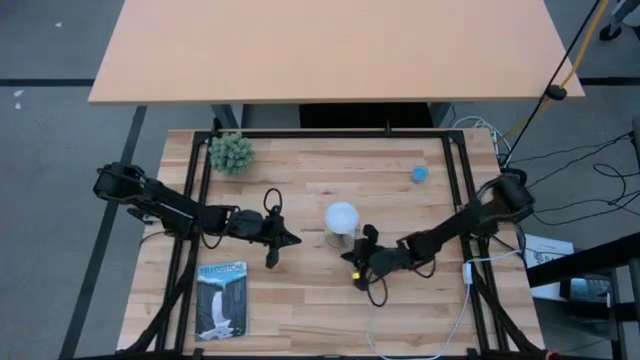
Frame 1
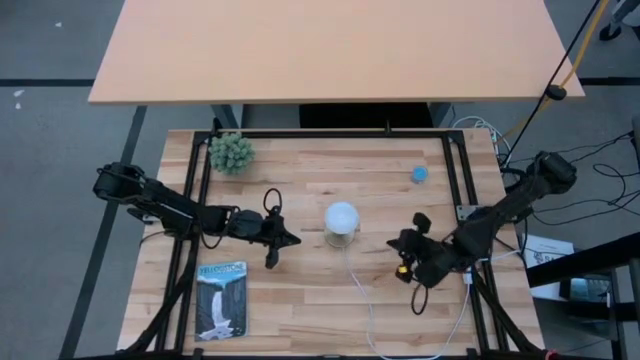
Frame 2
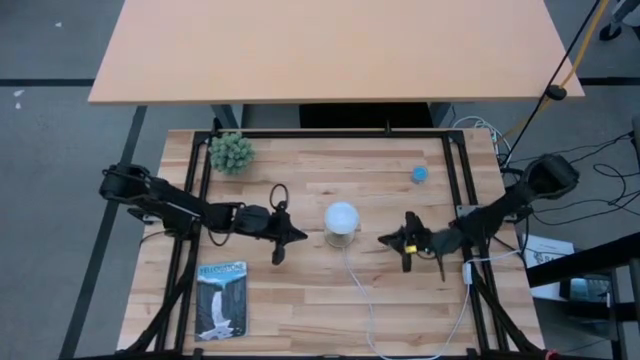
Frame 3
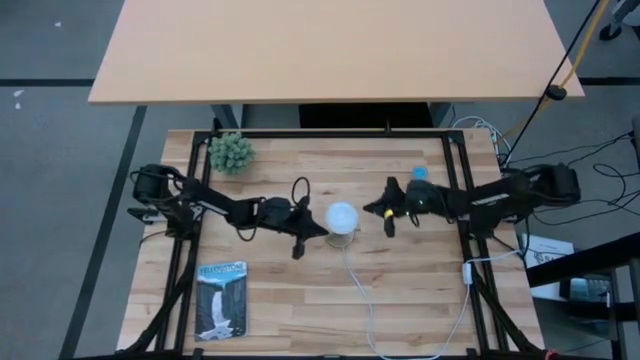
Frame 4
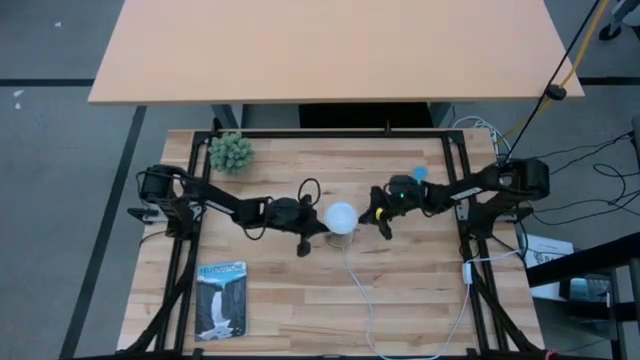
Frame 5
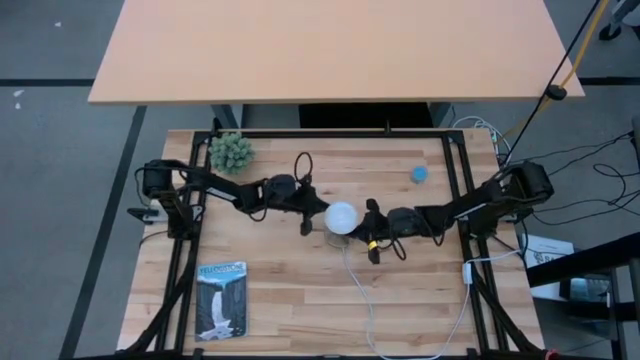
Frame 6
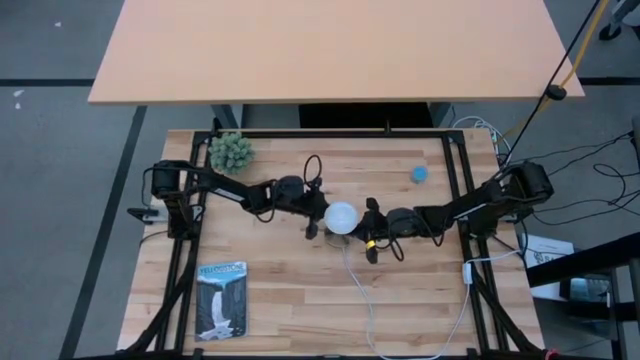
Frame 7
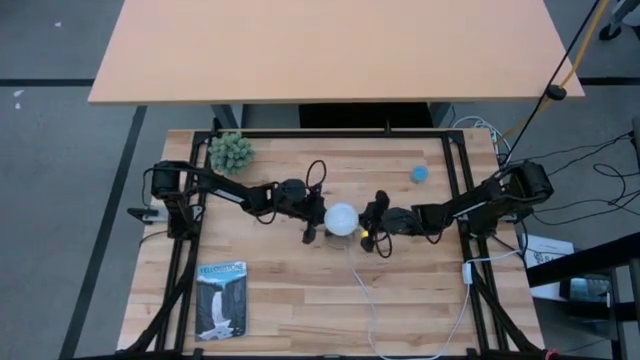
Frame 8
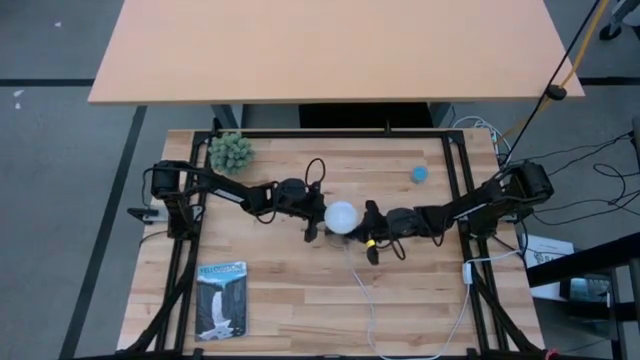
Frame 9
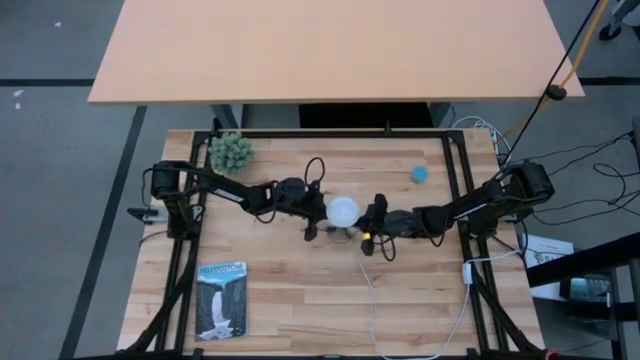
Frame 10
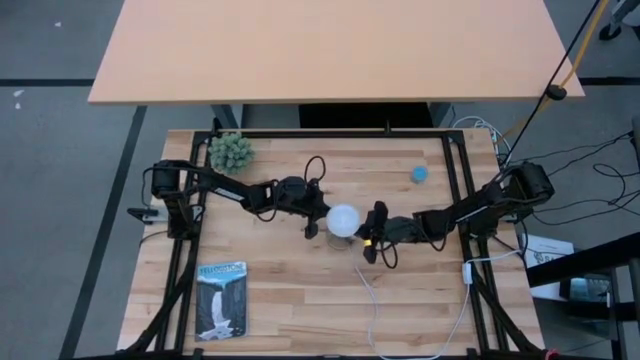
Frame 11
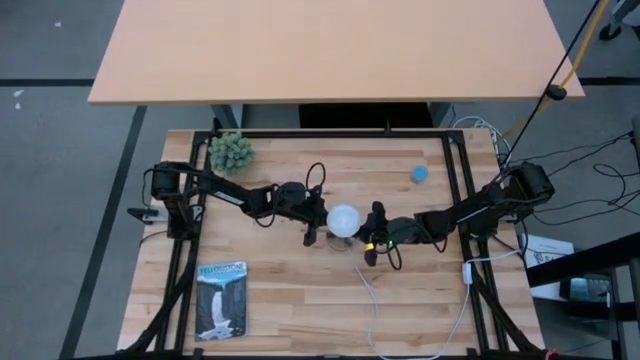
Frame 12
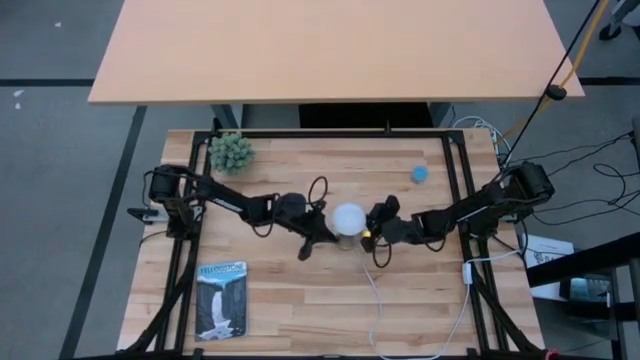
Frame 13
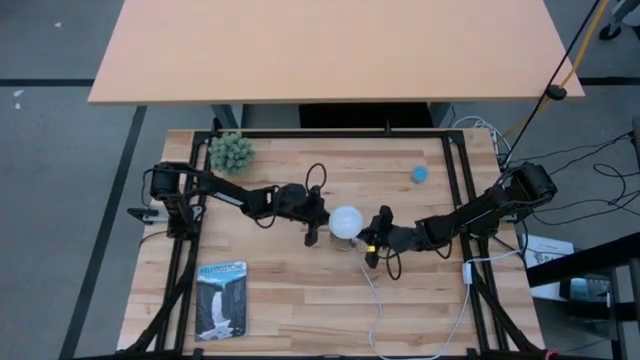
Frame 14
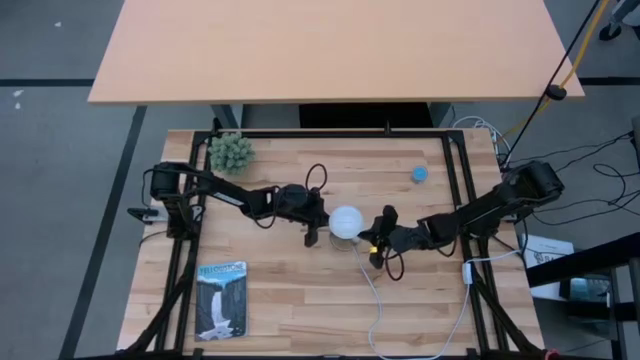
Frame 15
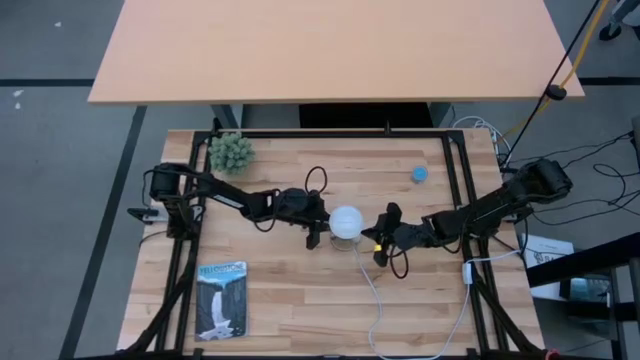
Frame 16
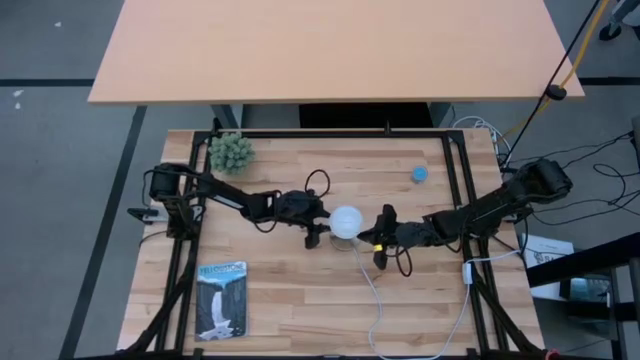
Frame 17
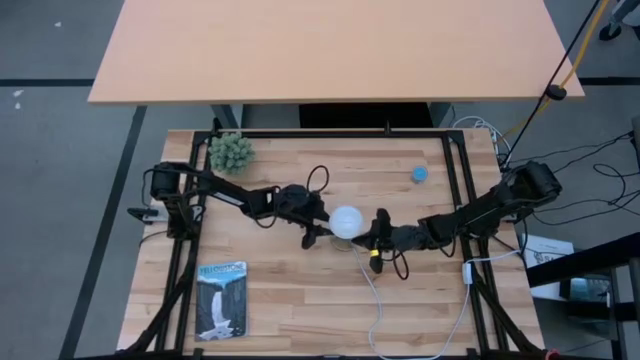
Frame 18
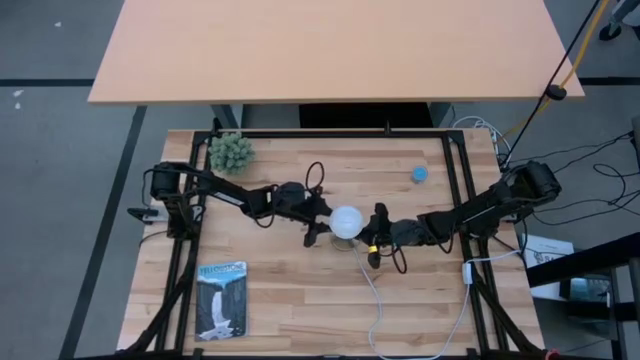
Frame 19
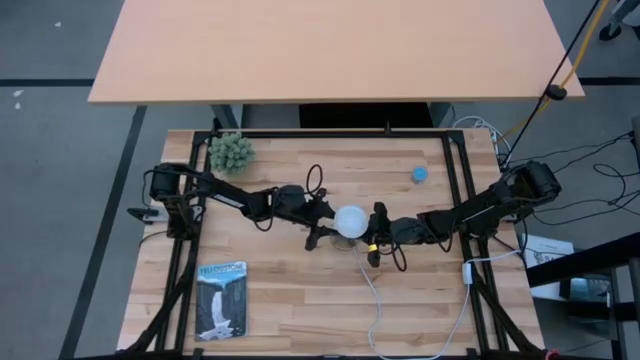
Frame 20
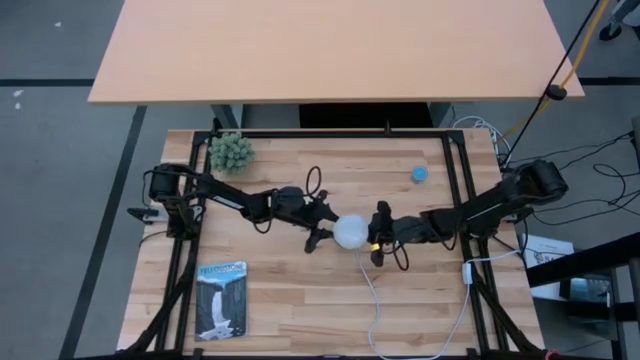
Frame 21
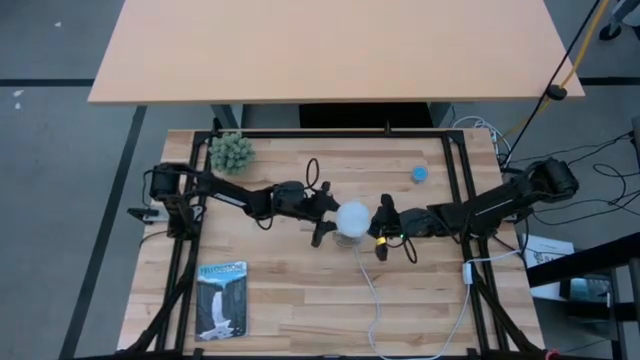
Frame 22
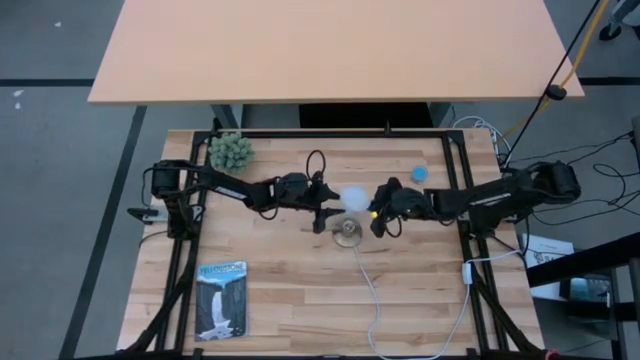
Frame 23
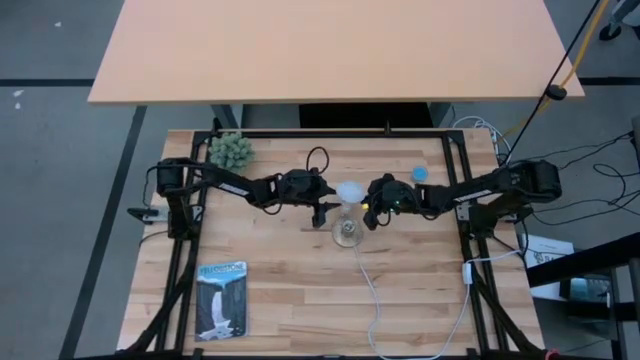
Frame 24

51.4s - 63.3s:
Task: Screw lightbulb
Remove the white lightbulb from the lamp

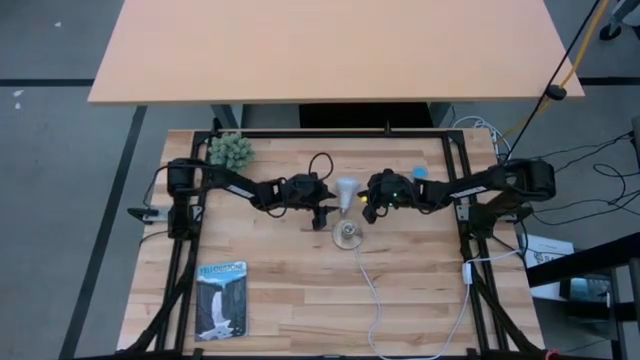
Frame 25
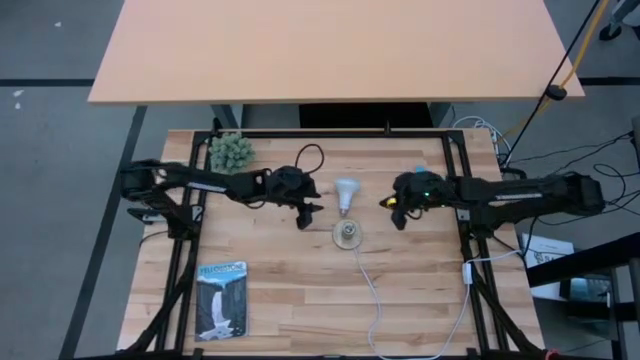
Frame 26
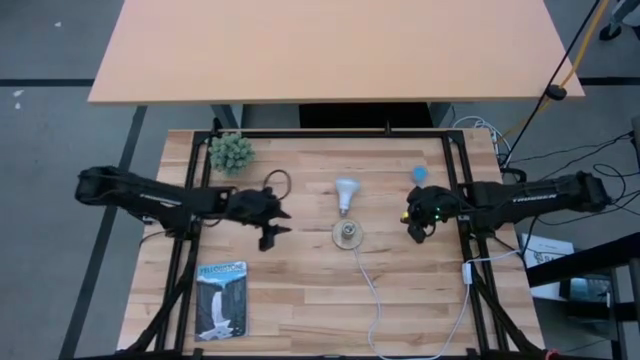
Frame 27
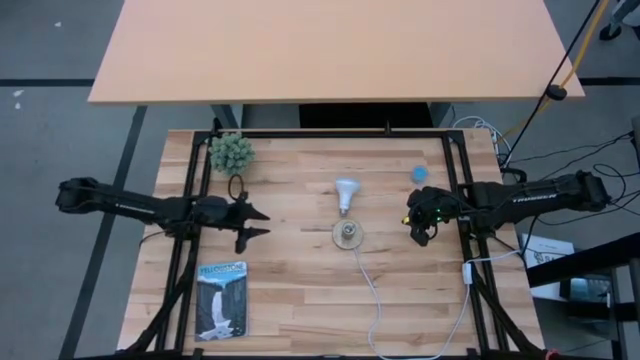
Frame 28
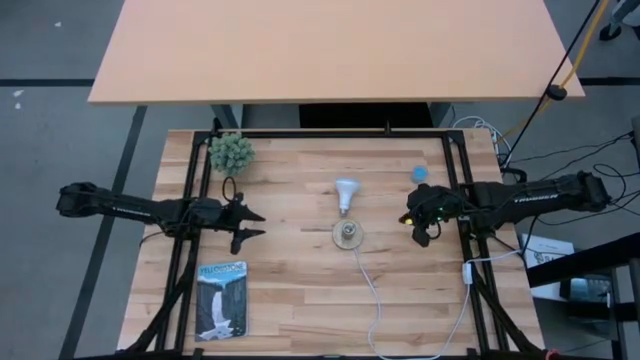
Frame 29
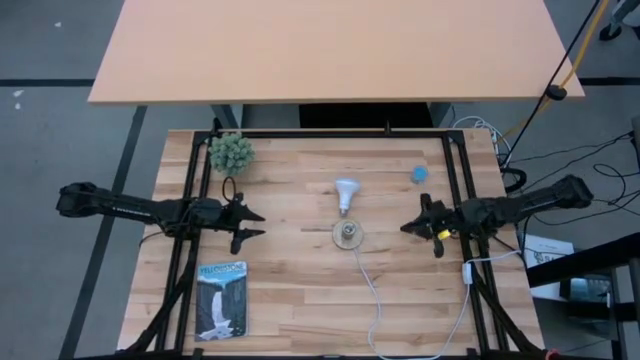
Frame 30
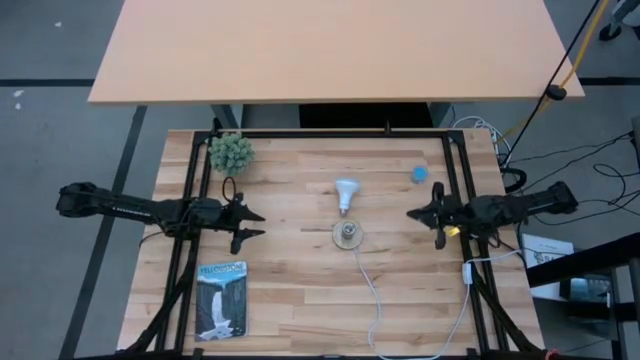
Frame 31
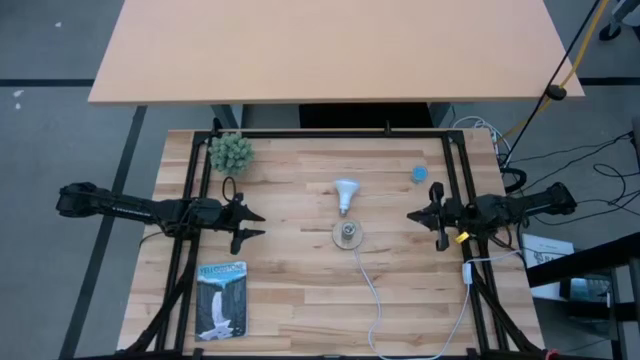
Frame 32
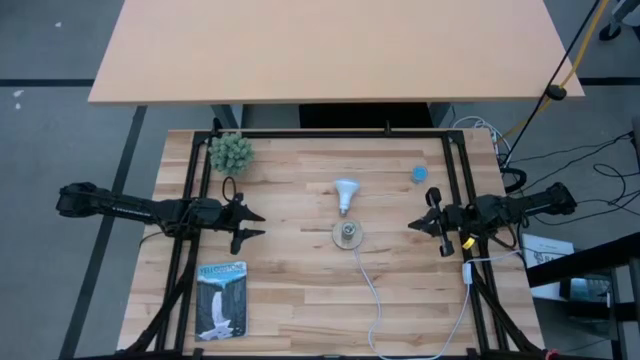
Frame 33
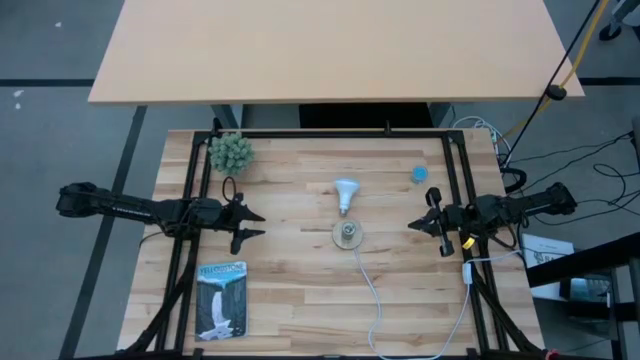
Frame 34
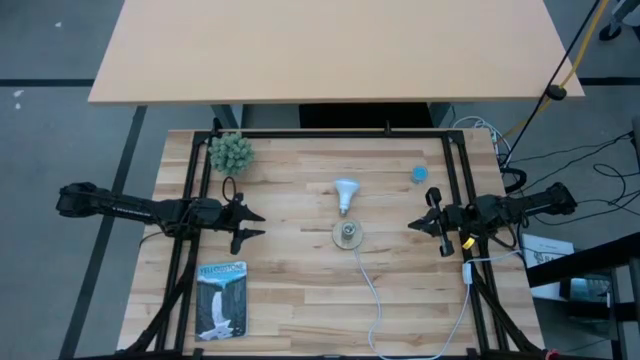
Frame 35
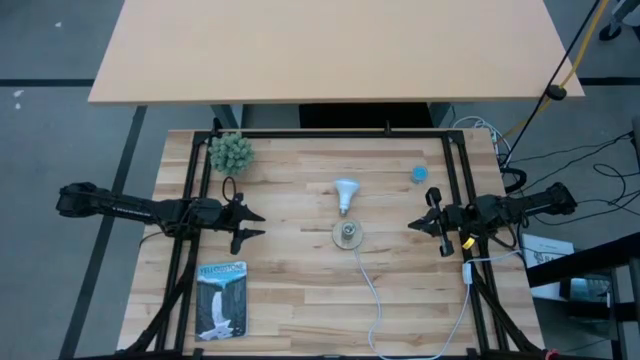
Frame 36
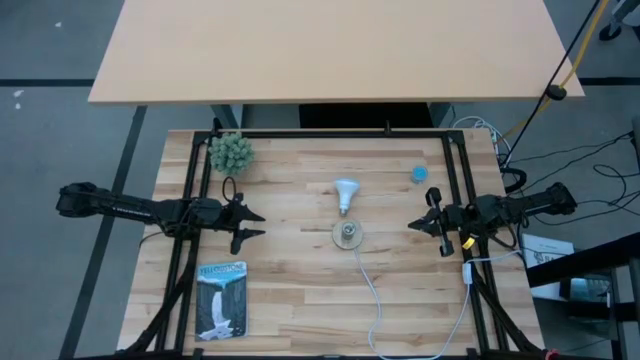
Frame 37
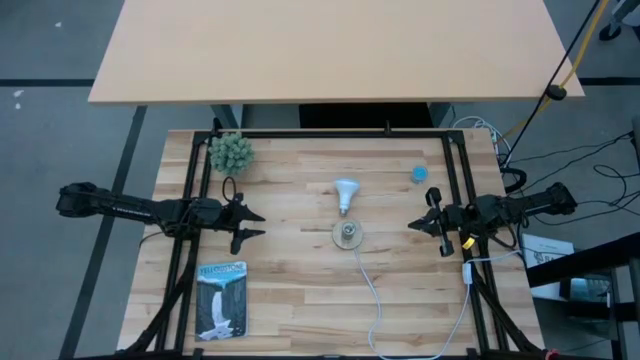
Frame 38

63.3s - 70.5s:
Return to Home Position

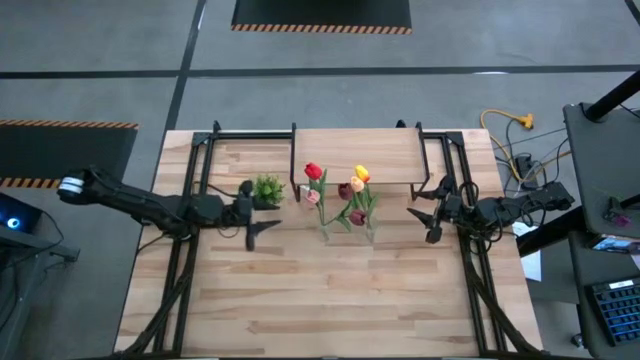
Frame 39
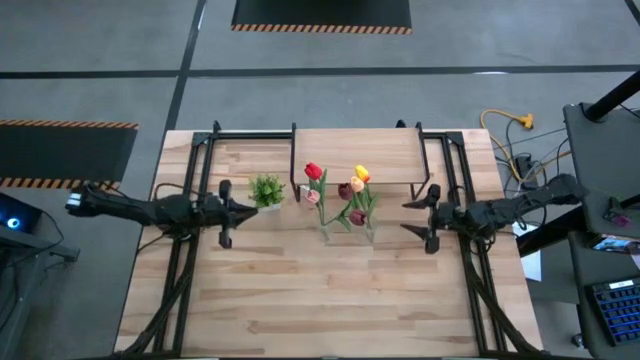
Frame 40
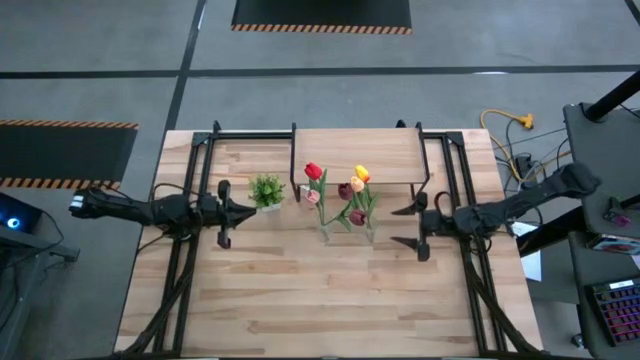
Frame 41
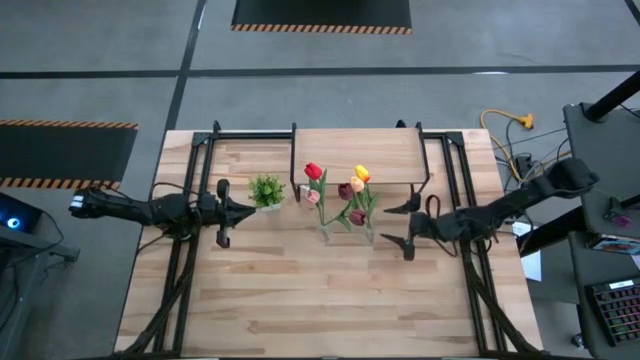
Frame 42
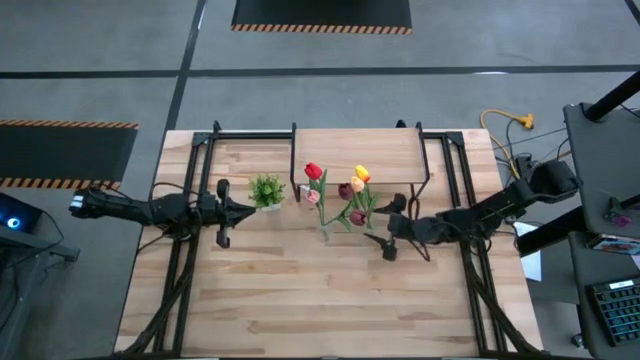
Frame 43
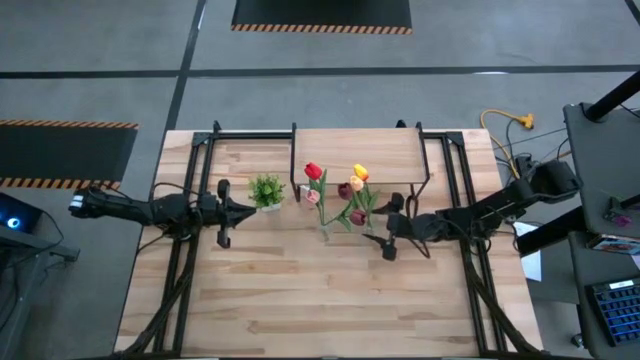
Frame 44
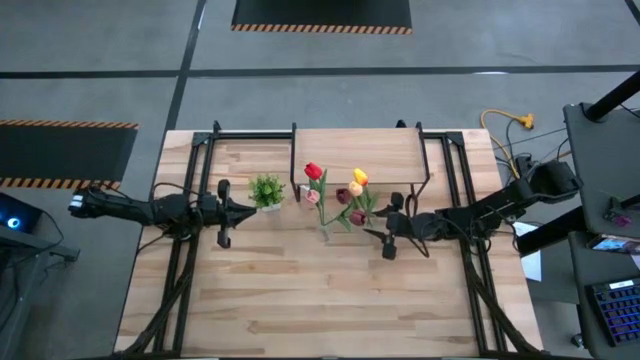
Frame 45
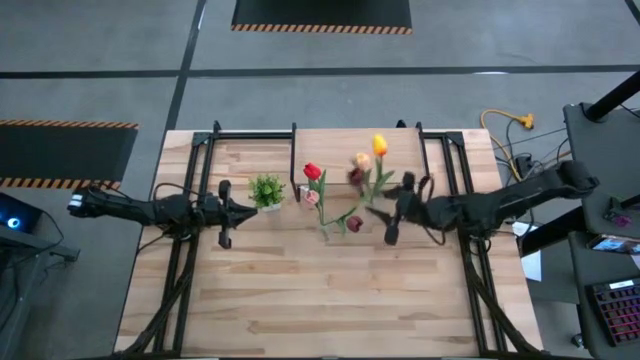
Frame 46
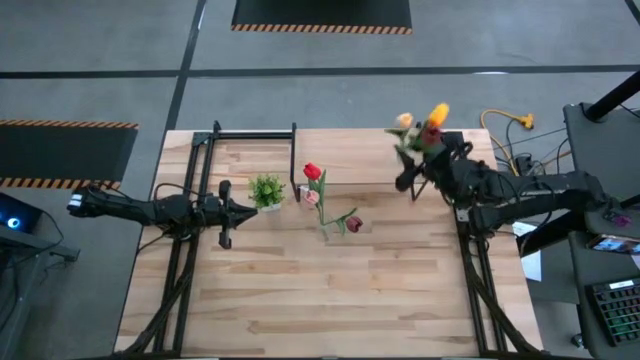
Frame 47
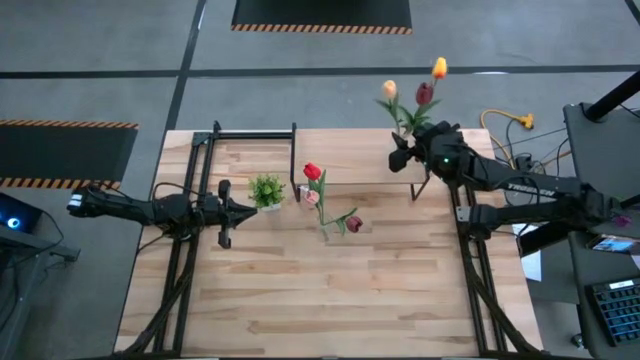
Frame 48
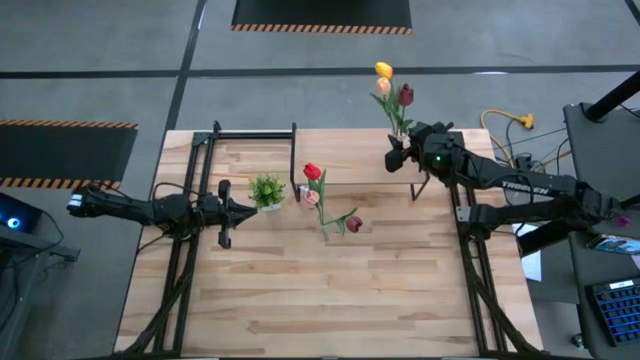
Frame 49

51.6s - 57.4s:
Task: Pick and place flowers into a vace then onto a shelf
Put the right flower vase on the shelf
